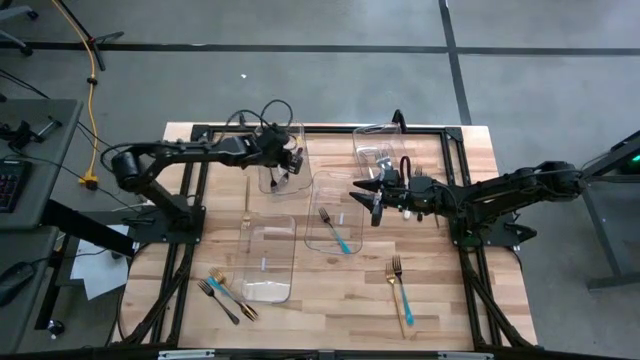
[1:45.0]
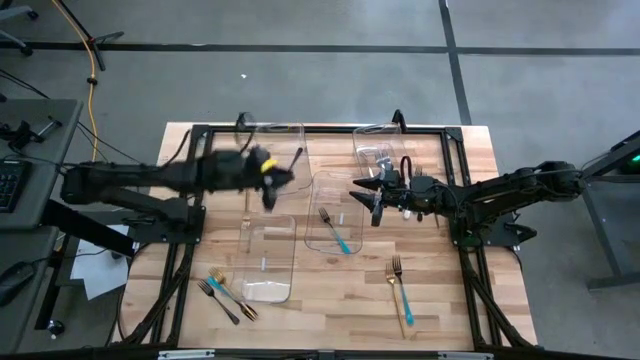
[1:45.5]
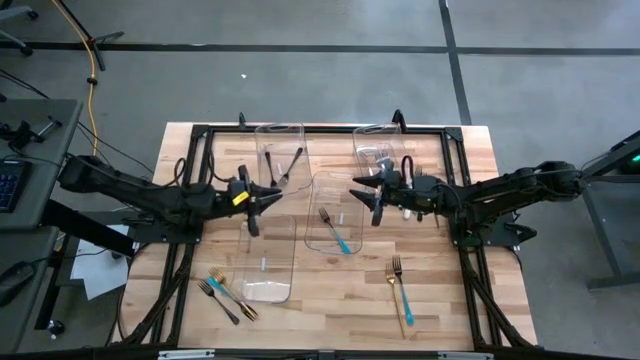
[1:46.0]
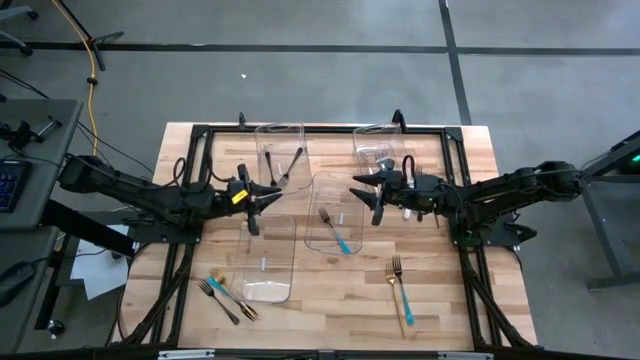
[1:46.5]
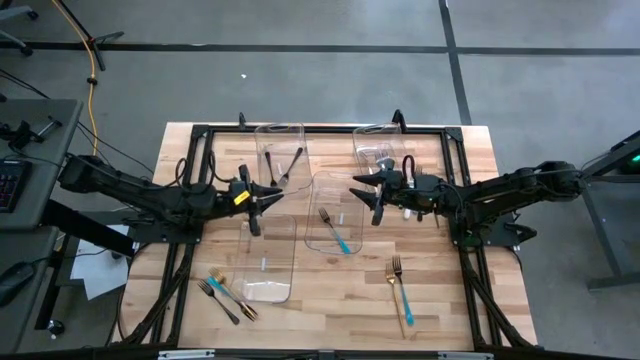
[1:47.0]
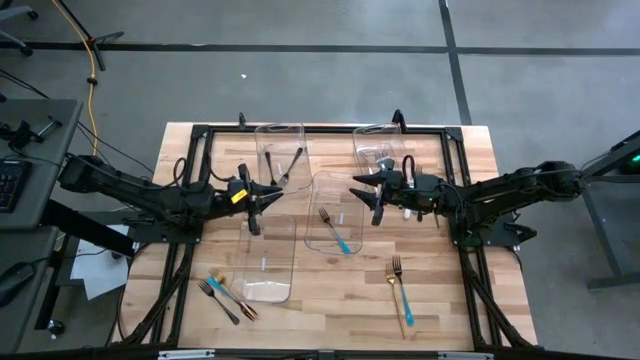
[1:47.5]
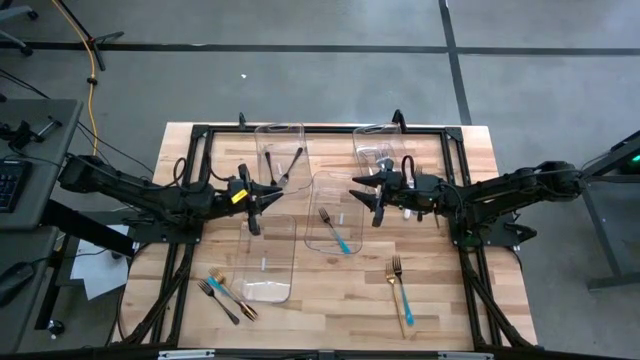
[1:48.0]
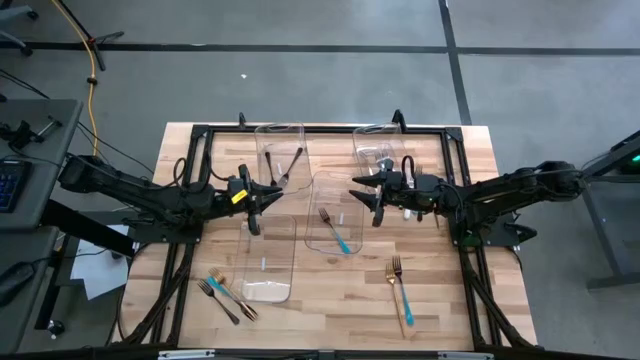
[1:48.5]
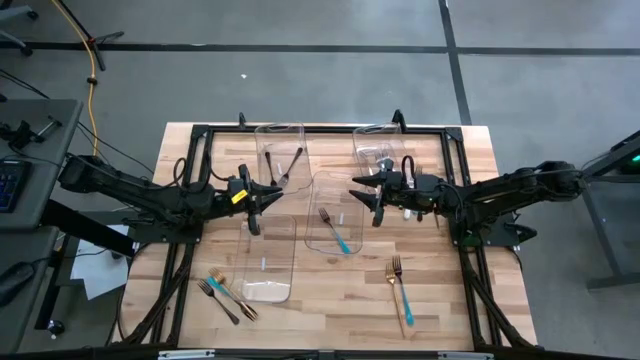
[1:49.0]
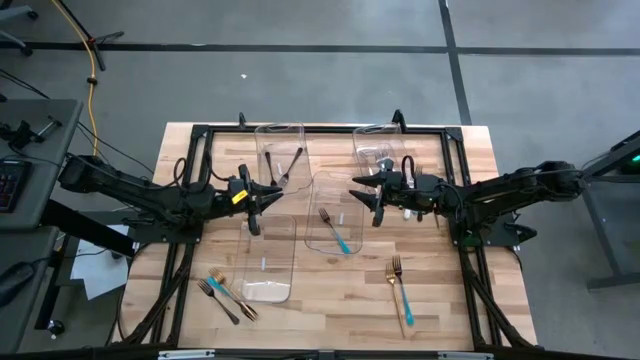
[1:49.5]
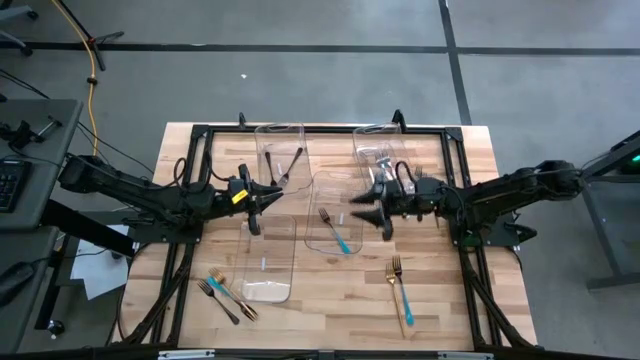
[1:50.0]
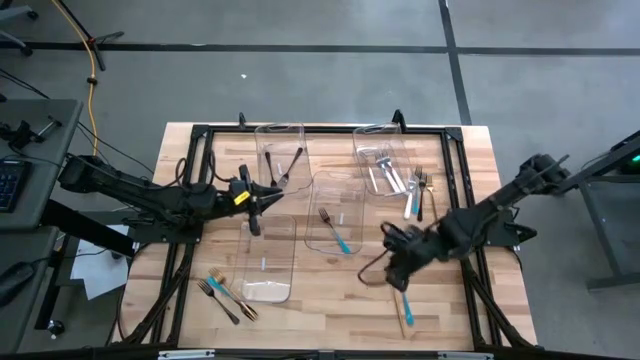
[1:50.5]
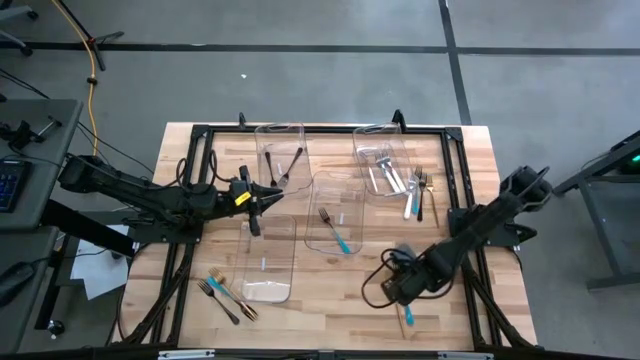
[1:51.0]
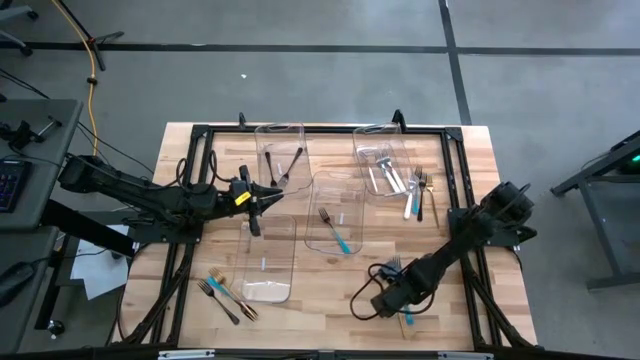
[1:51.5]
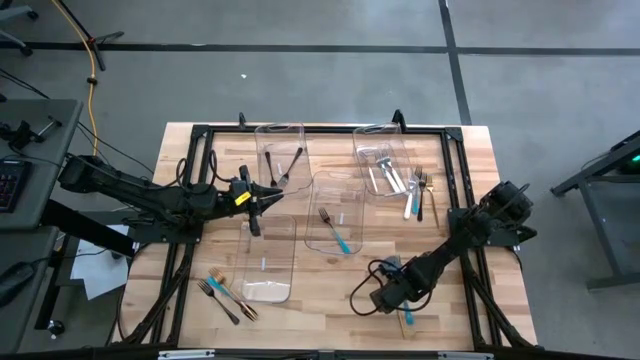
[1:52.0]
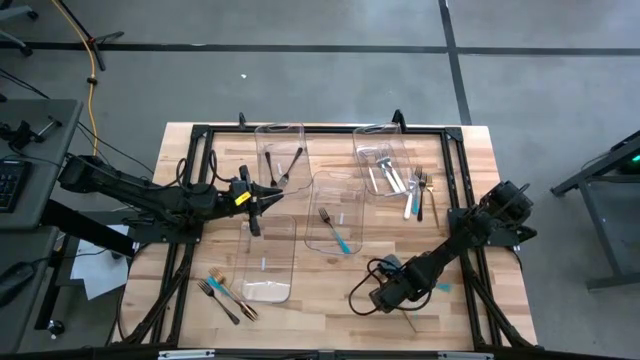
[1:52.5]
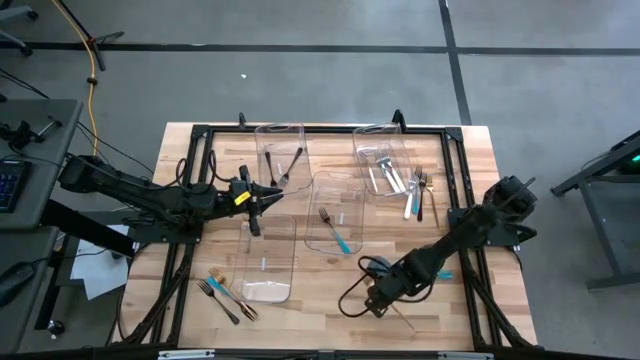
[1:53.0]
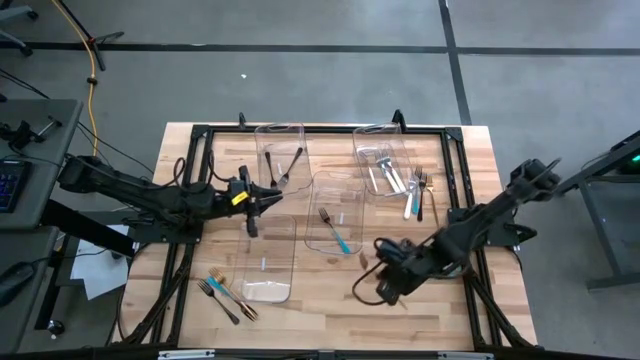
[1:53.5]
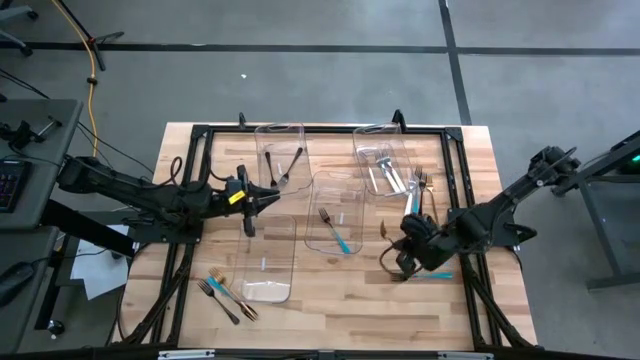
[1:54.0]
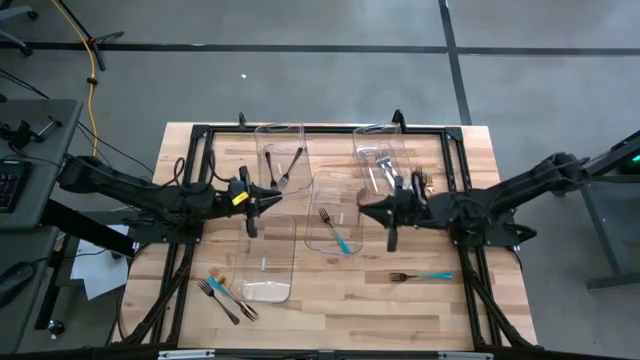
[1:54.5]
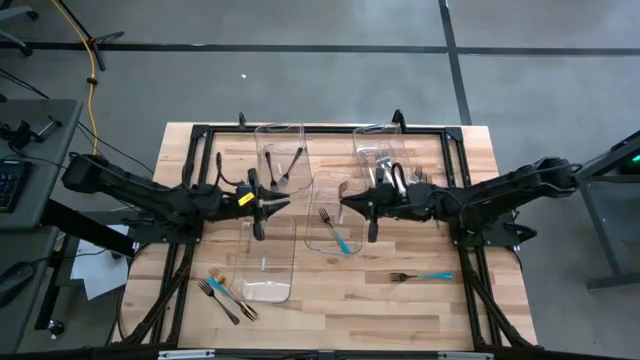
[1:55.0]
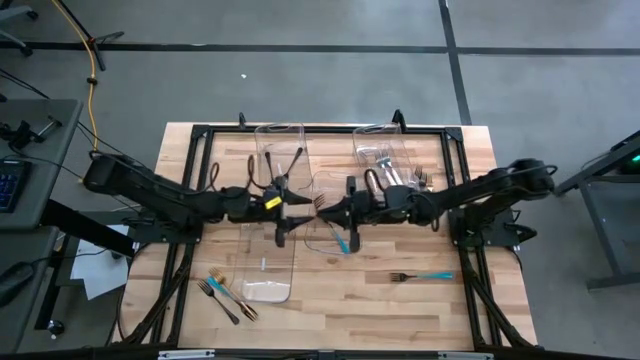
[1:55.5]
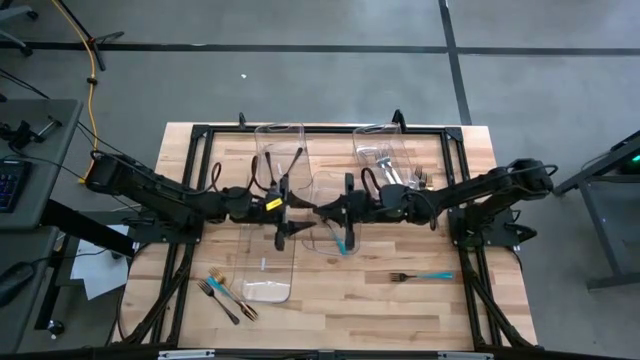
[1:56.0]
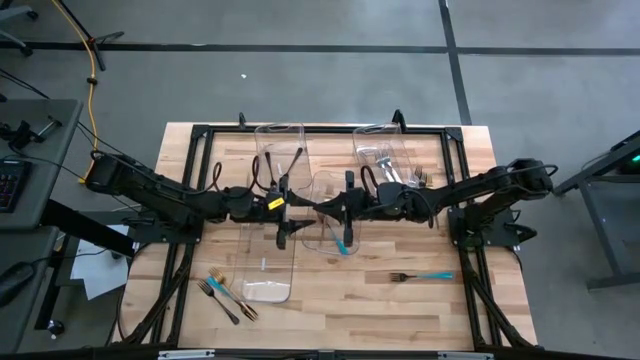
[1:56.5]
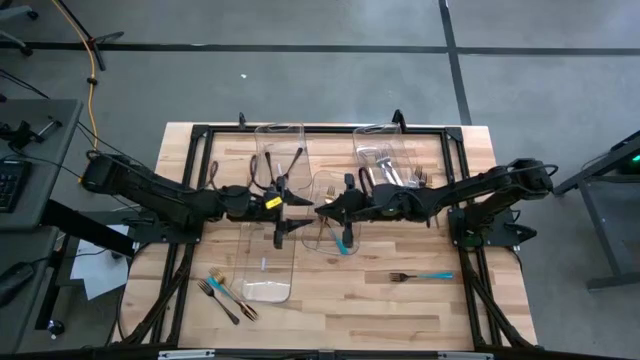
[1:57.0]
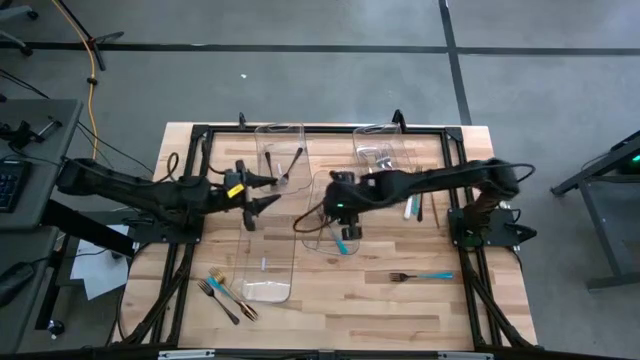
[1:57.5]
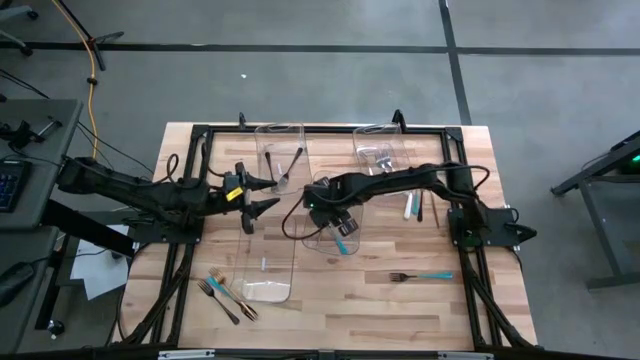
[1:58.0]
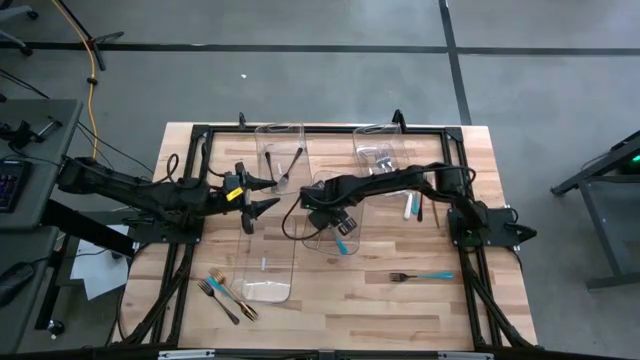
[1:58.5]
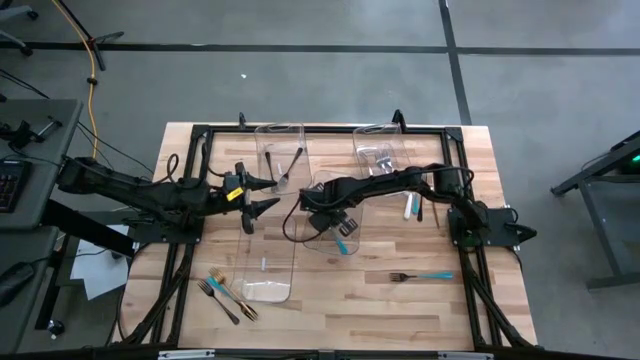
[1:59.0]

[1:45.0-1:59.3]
Task: Sort silverware by color (type)
Put the gold fork into the bottom left transparent bin

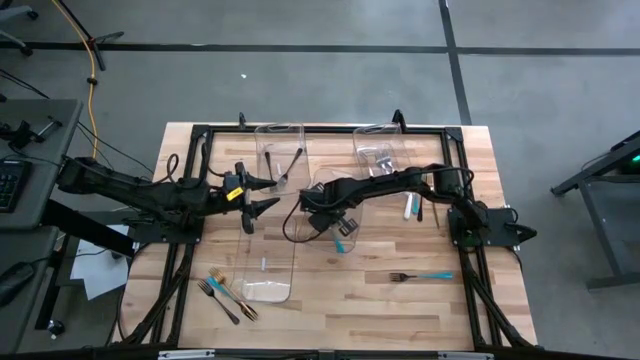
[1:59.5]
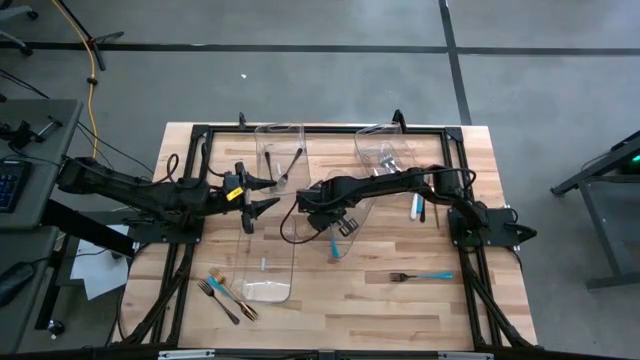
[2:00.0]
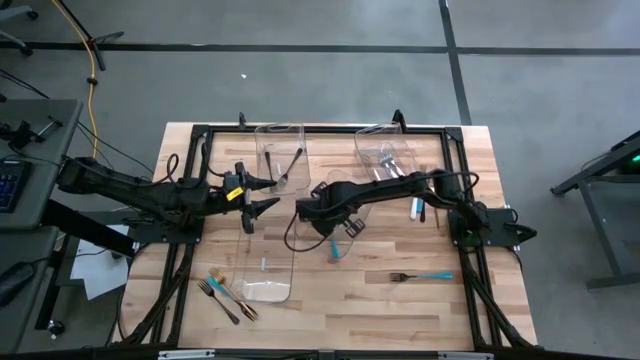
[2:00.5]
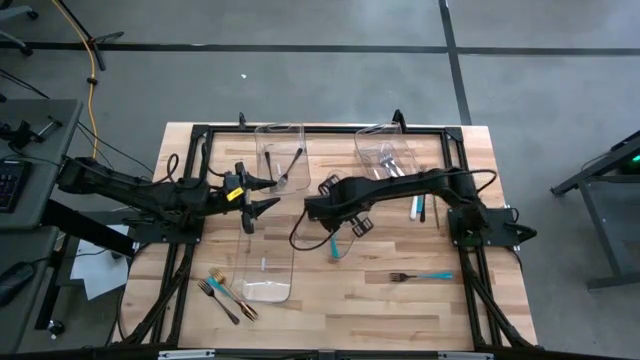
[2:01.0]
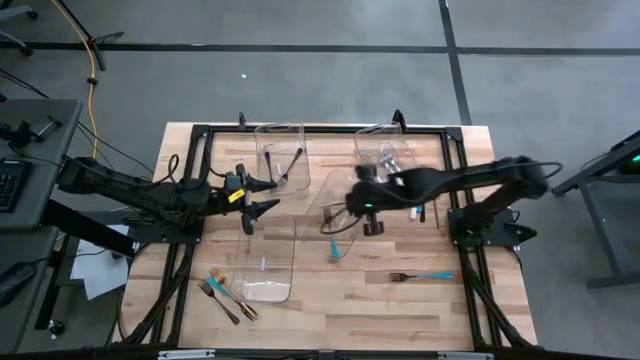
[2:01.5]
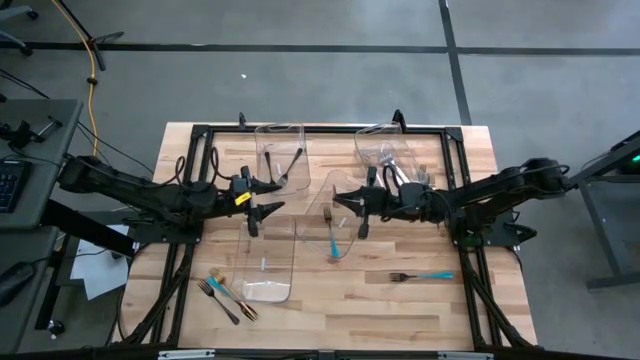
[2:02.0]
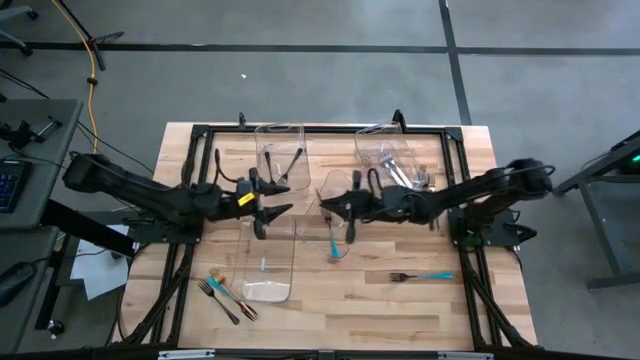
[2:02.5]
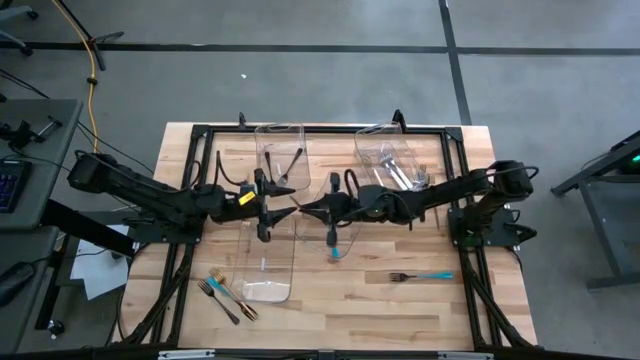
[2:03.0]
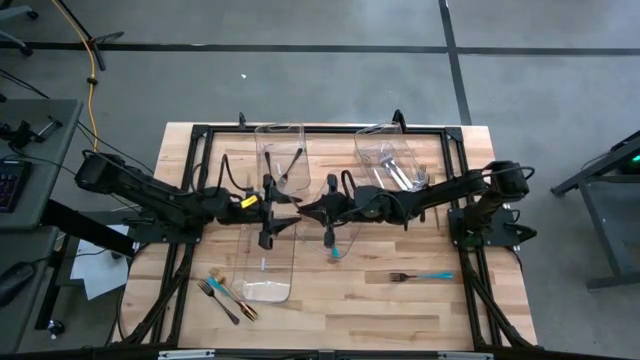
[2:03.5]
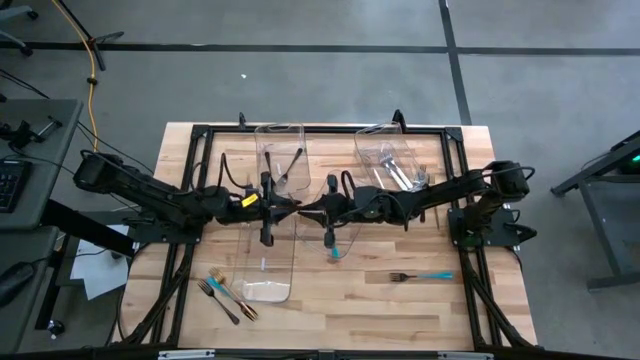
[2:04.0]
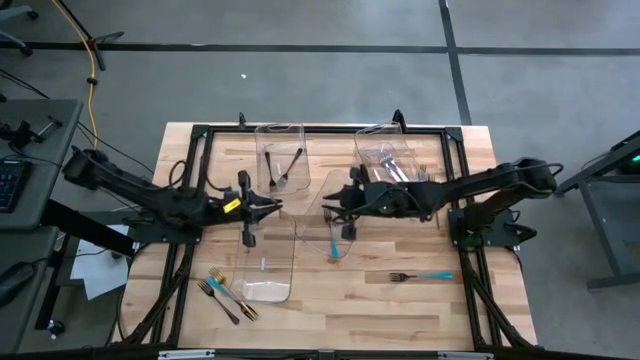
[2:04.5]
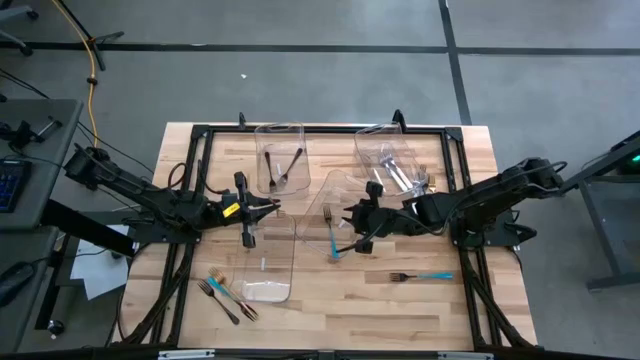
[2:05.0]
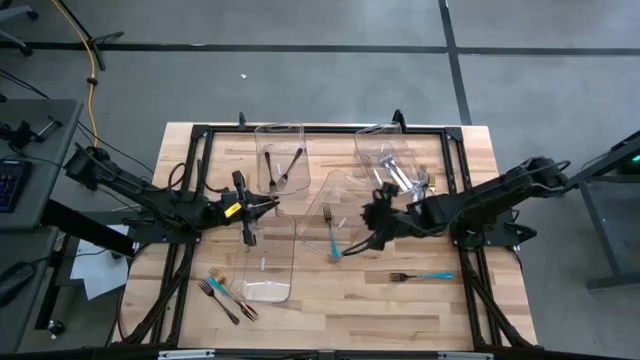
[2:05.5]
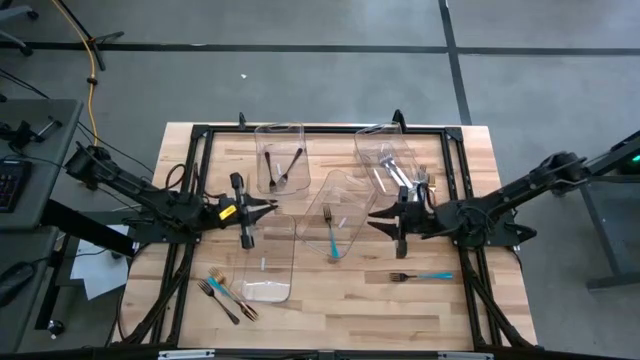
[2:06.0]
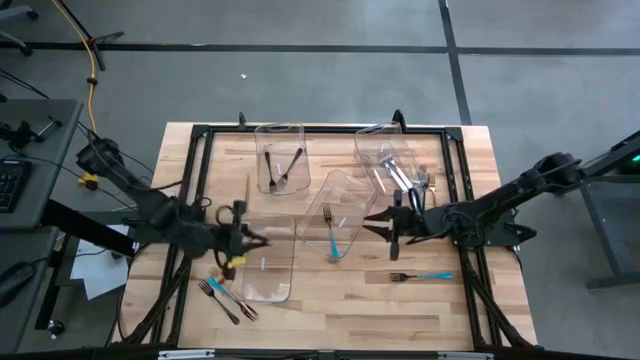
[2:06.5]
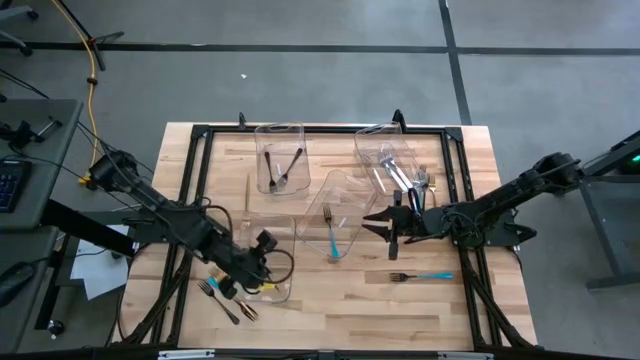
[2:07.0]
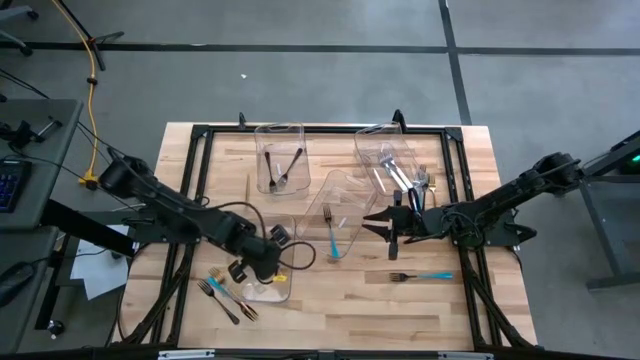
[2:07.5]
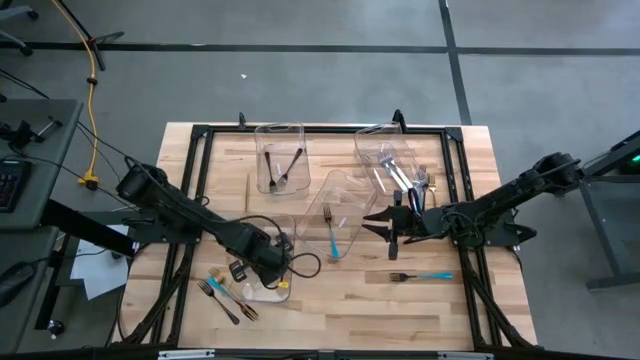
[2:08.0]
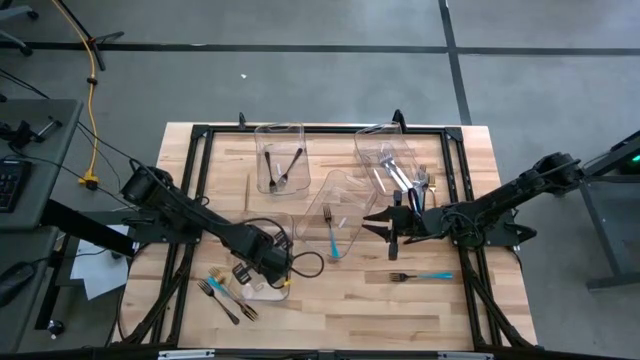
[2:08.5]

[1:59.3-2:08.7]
Put the gold fork into the bottom left transparent bin
